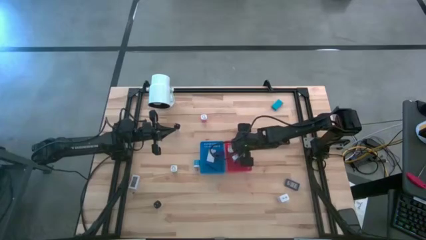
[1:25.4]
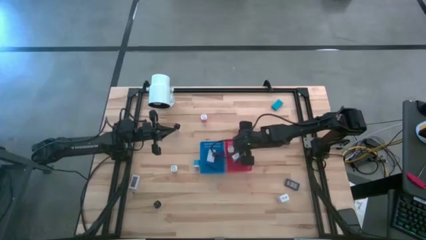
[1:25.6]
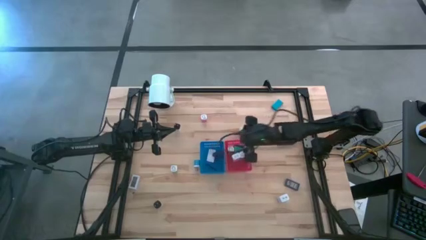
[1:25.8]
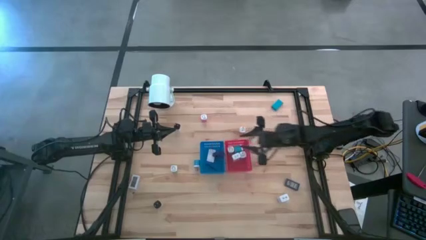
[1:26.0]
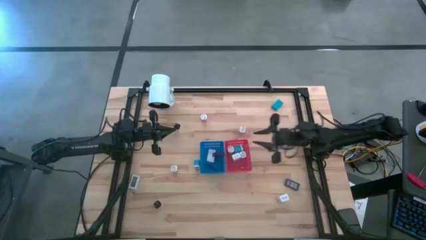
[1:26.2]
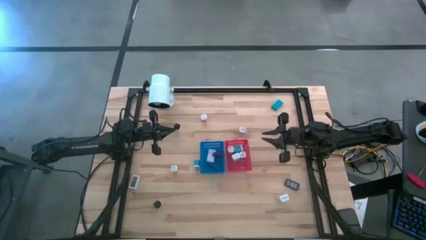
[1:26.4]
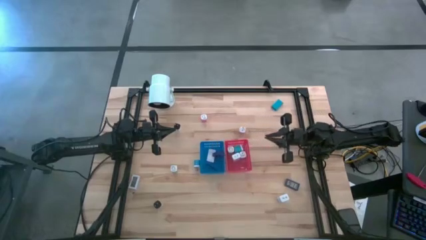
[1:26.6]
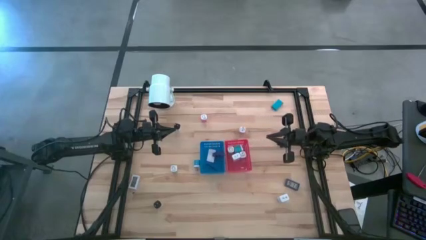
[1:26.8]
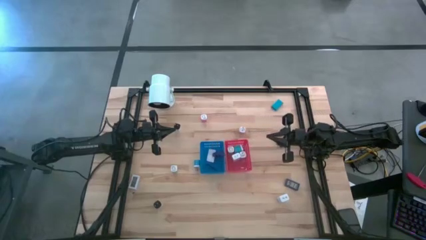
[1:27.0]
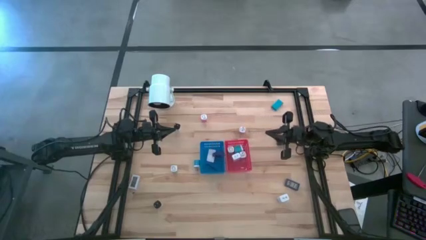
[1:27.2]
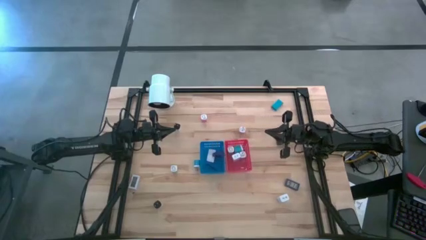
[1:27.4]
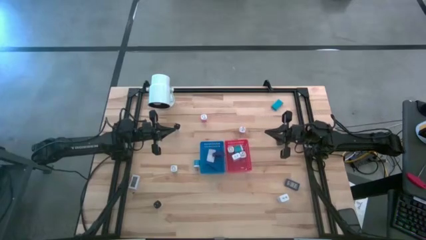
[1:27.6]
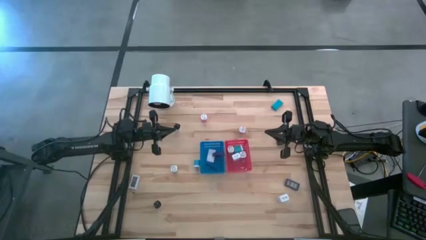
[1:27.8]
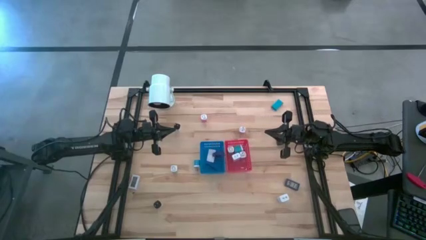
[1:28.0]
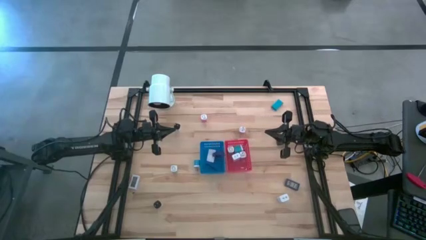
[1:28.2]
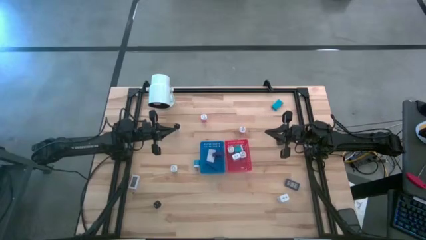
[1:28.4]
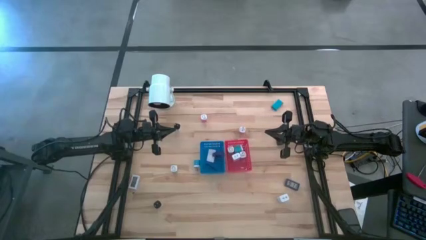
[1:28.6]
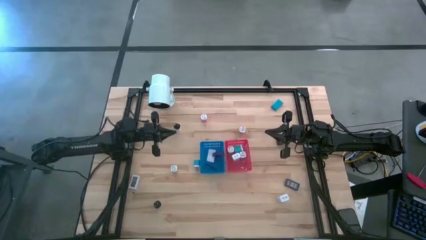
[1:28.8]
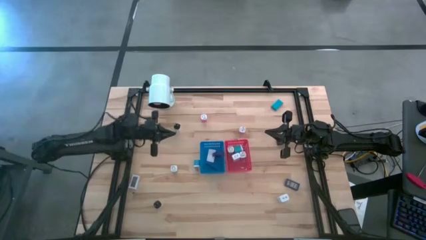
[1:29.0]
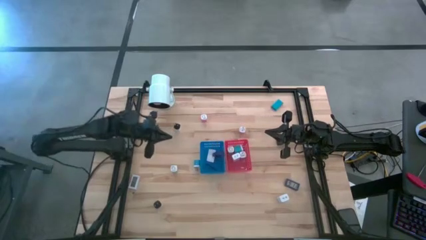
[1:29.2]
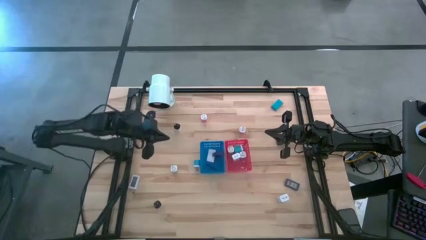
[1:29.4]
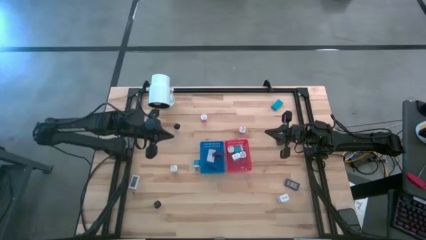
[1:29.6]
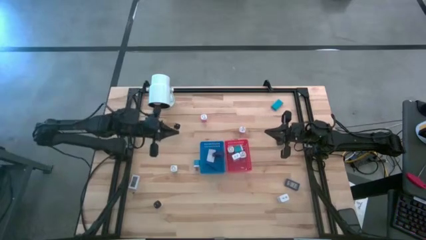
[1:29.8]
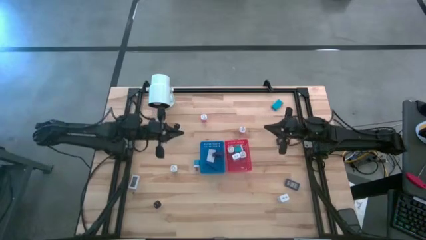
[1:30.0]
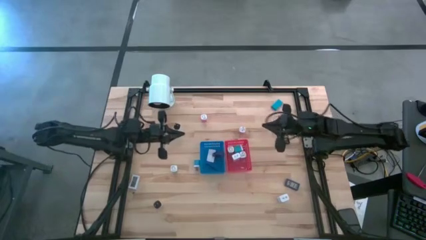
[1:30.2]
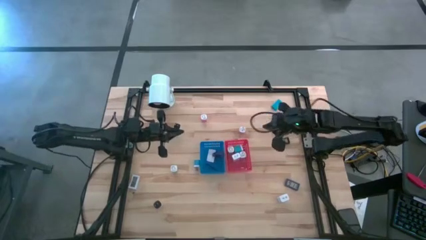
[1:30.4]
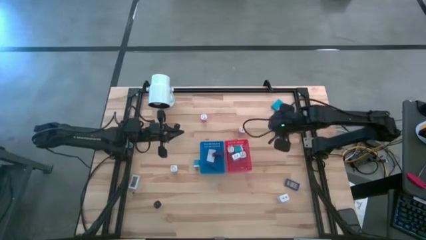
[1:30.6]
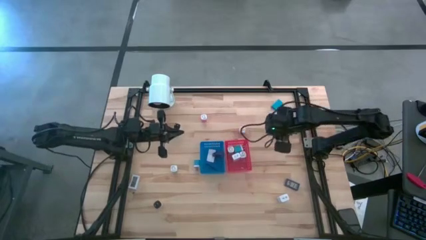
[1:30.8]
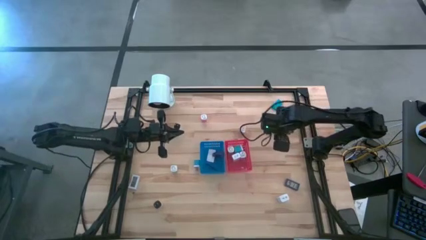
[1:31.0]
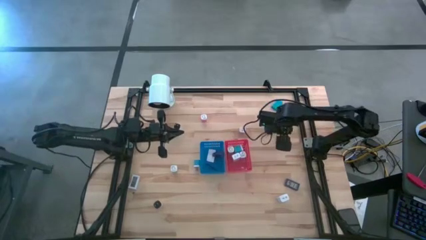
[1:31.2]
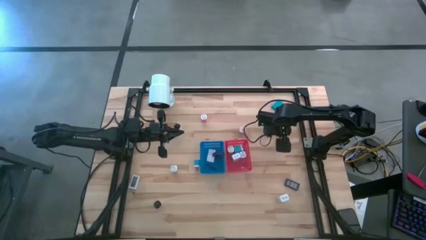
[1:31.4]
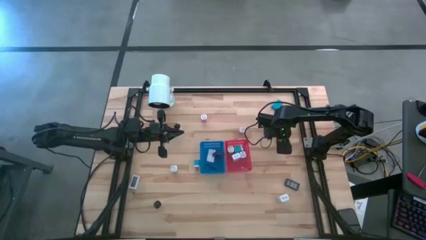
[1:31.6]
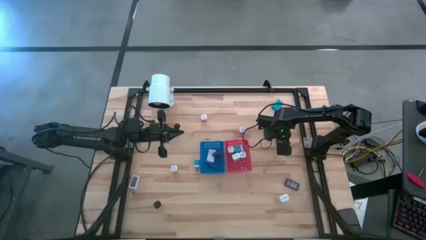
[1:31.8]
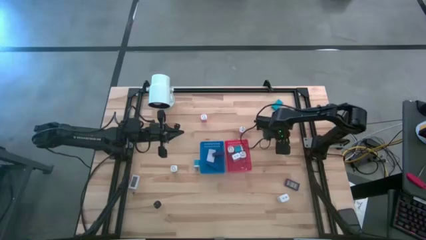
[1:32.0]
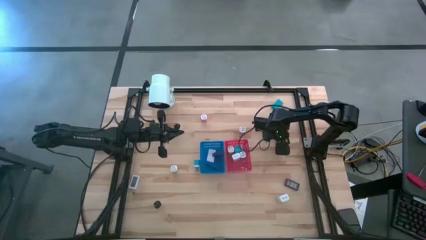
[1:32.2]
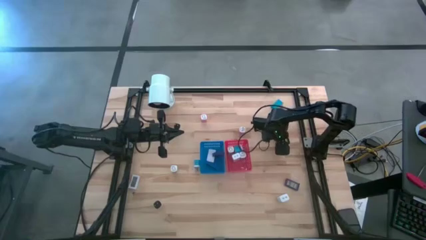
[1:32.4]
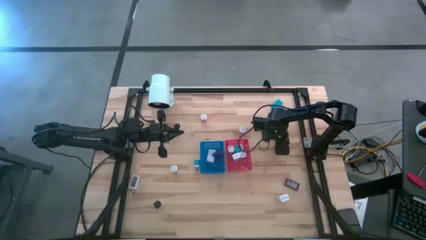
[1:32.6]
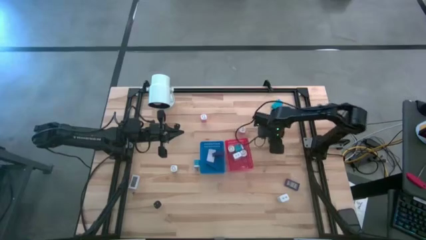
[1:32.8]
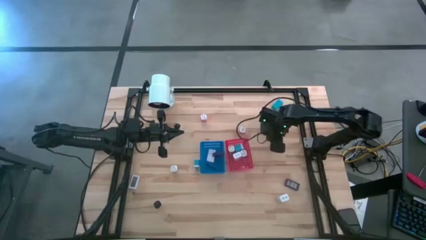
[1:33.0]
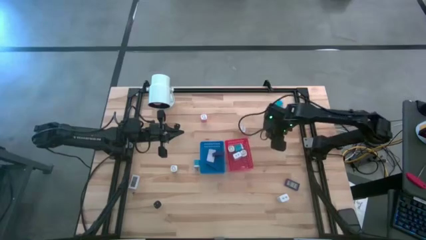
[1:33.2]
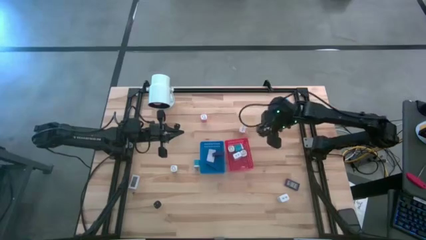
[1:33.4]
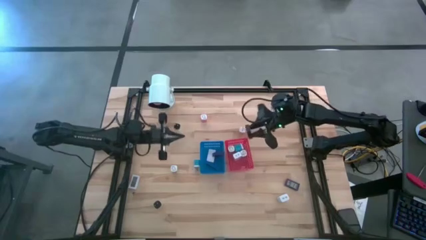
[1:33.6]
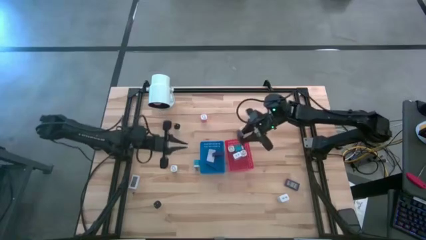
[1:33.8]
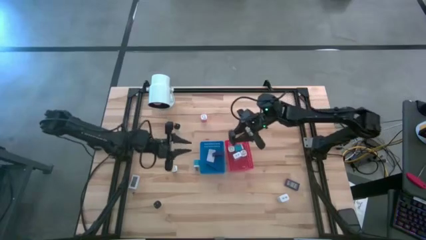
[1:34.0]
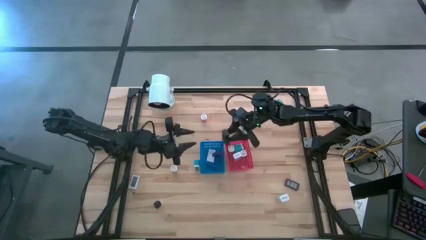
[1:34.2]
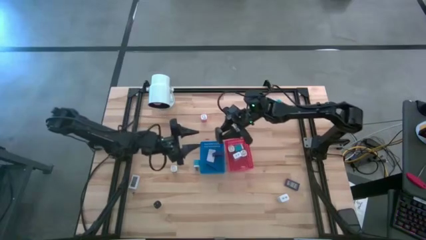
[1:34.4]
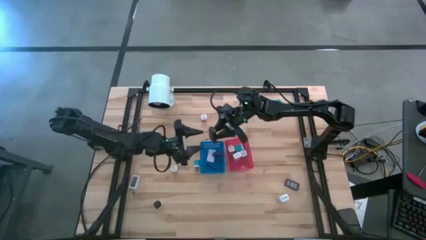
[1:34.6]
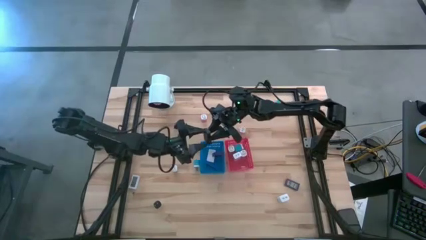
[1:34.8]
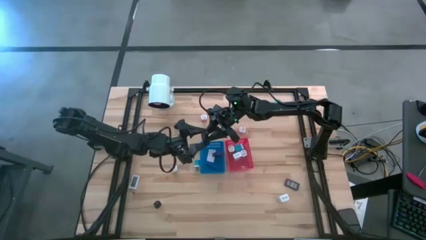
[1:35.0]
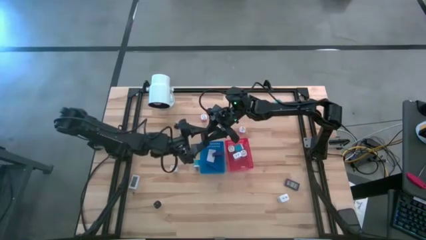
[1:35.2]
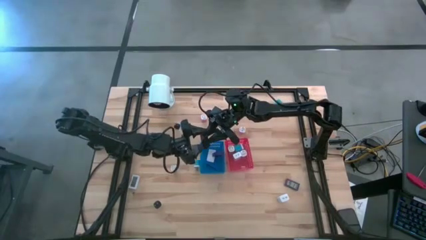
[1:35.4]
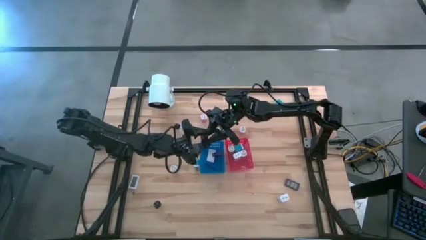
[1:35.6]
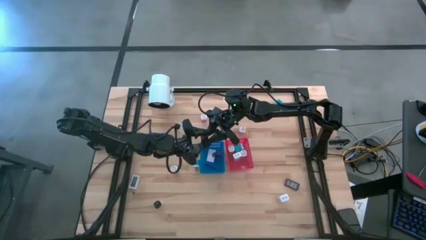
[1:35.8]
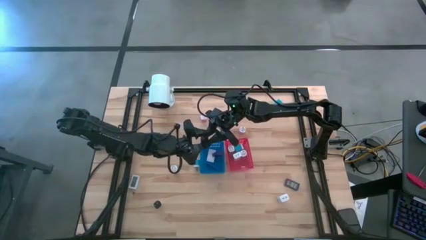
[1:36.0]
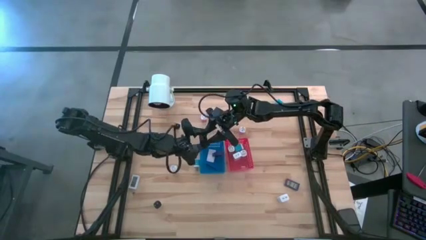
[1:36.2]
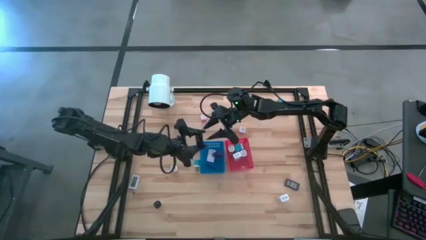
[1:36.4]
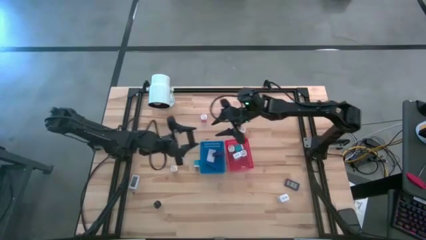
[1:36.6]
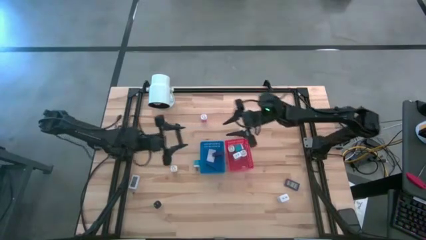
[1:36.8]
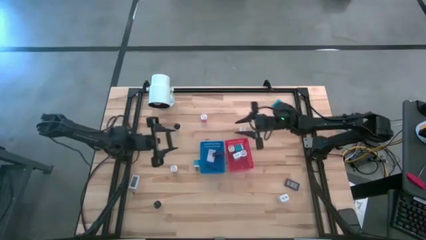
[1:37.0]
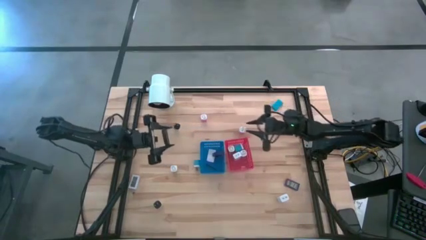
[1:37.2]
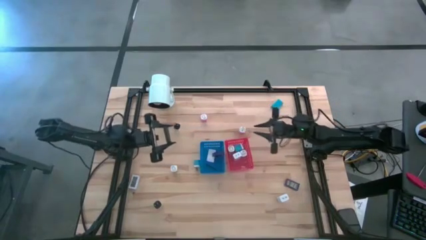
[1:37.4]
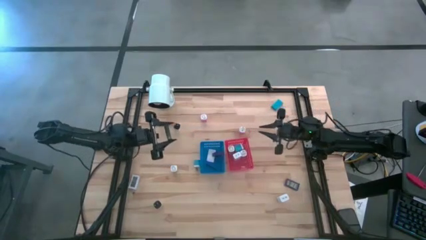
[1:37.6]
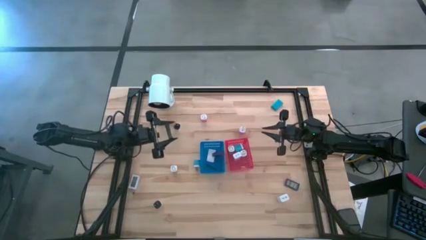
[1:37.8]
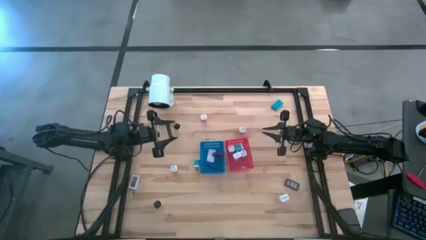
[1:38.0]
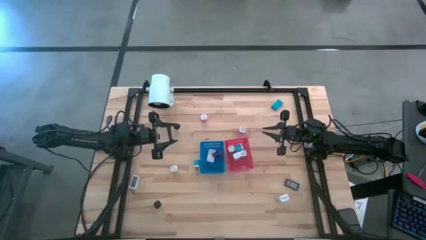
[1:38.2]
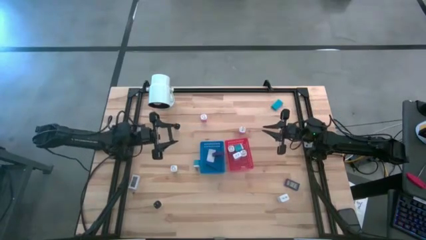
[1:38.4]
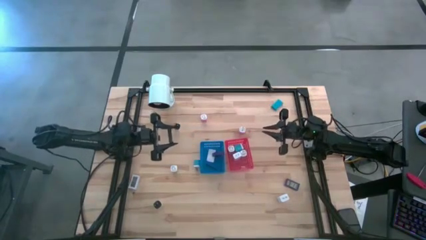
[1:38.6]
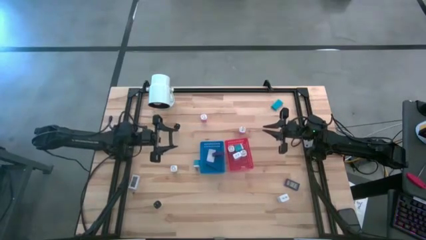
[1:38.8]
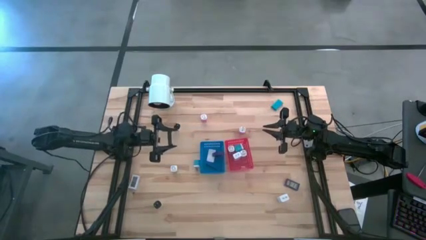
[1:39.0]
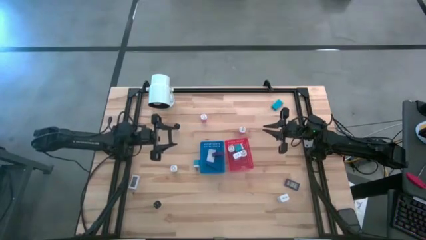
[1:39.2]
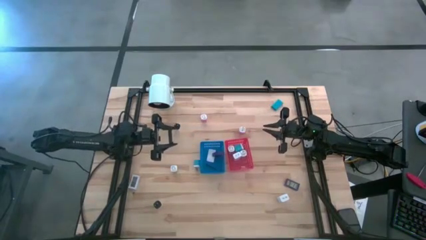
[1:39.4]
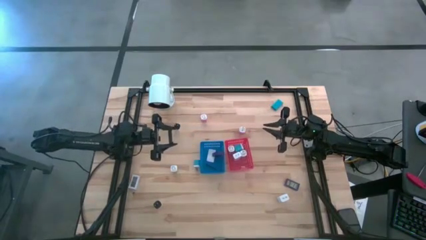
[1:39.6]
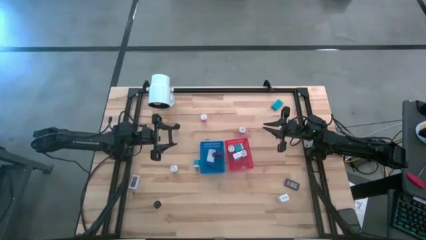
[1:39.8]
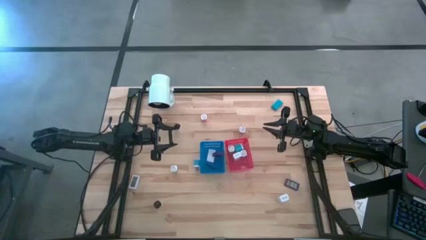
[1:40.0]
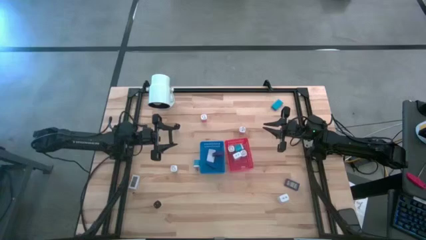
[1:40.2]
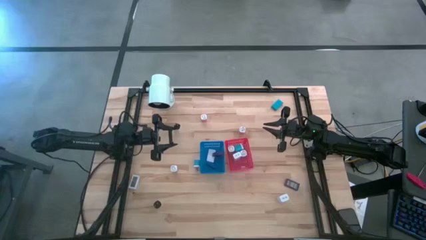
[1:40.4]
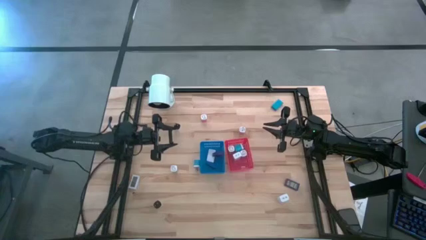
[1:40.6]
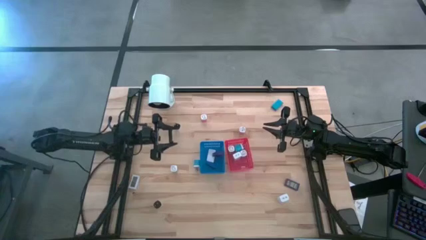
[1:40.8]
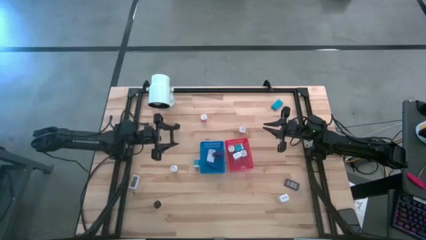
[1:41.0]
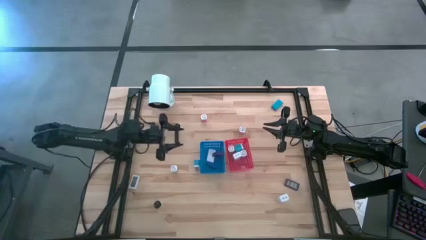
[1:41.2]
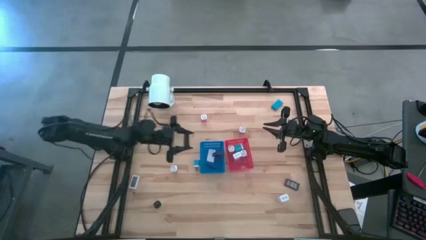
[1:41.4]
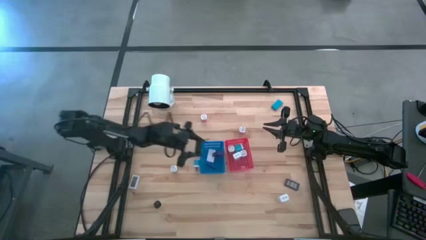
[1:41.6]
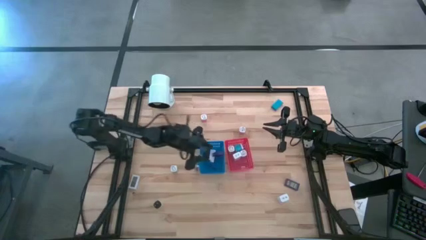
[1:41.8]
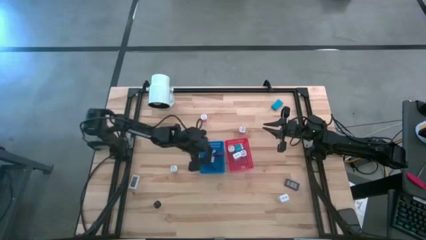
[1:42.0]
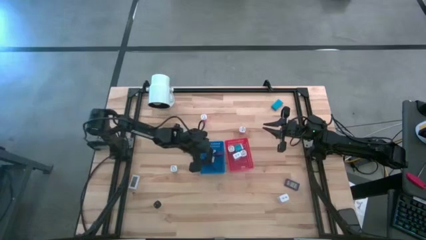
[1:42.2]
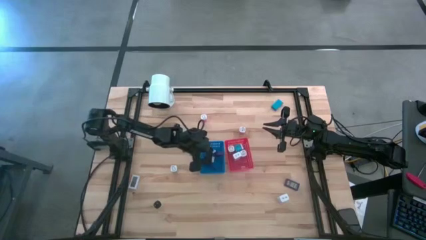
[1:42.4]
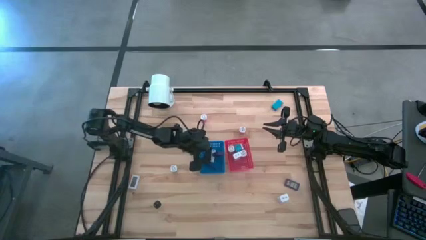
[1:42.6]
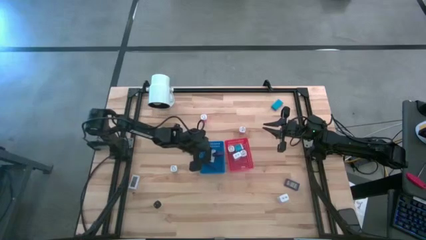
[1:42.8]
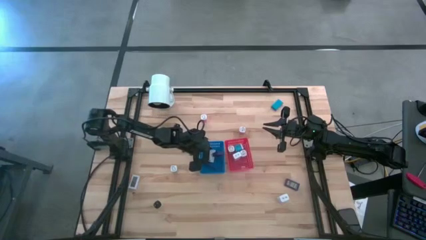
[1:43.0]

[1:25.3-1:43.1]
Task: Sort adapters and digital timers
Put the black timer into the blue bin
